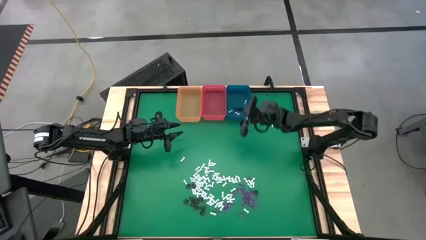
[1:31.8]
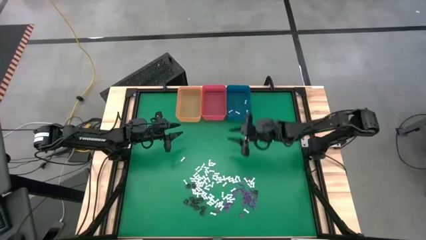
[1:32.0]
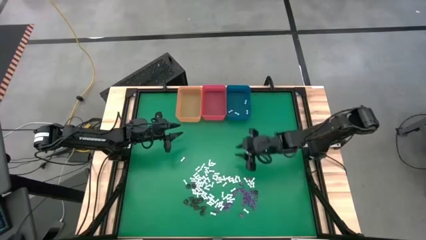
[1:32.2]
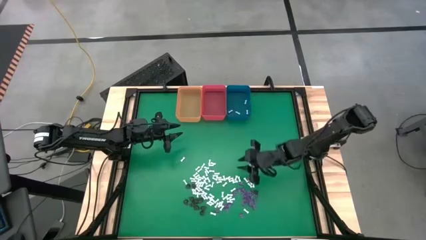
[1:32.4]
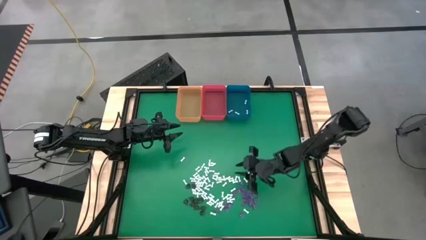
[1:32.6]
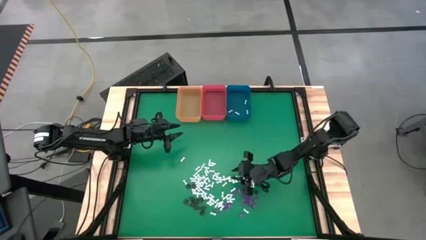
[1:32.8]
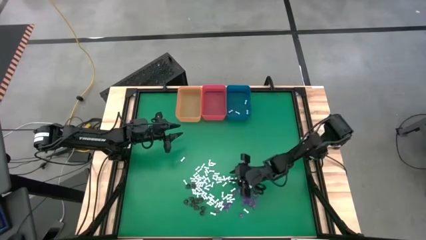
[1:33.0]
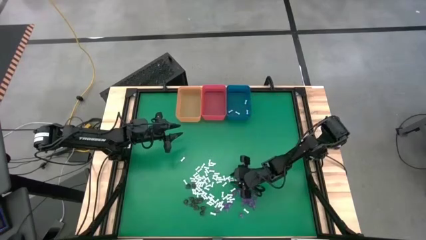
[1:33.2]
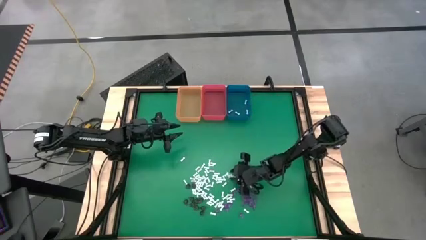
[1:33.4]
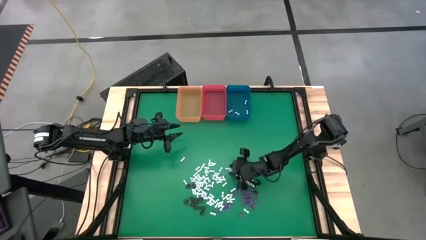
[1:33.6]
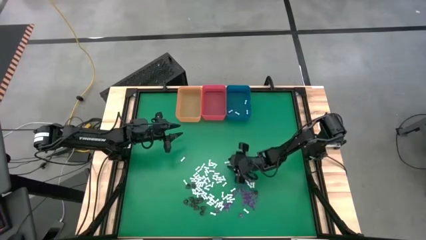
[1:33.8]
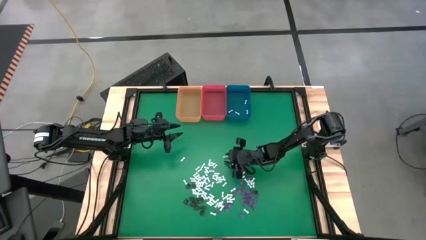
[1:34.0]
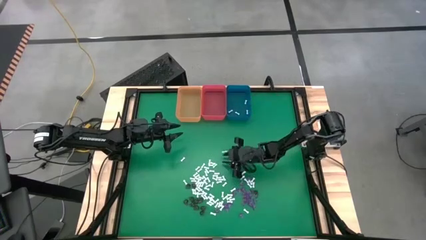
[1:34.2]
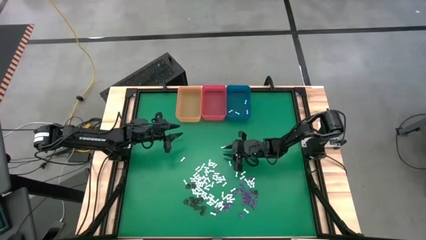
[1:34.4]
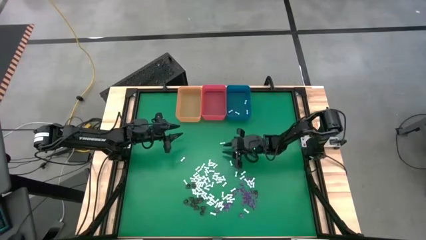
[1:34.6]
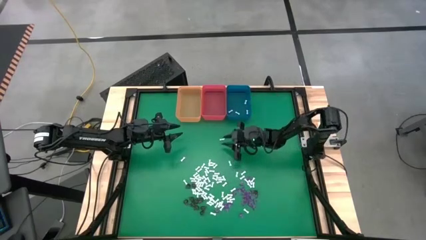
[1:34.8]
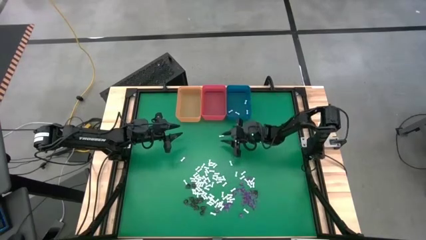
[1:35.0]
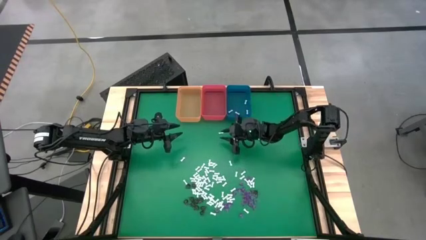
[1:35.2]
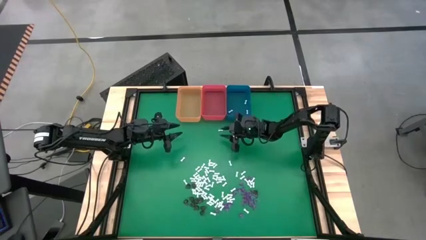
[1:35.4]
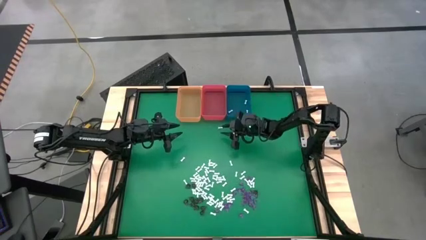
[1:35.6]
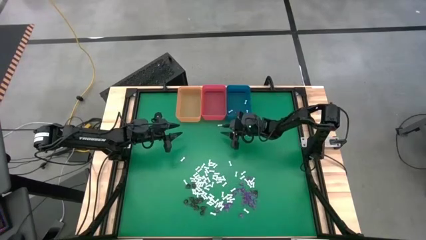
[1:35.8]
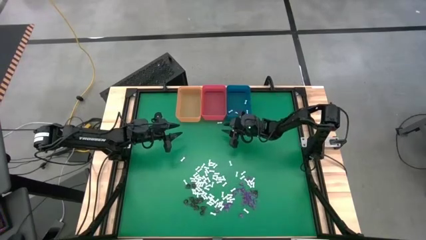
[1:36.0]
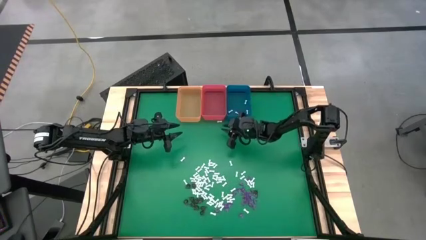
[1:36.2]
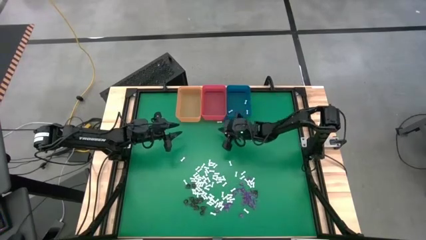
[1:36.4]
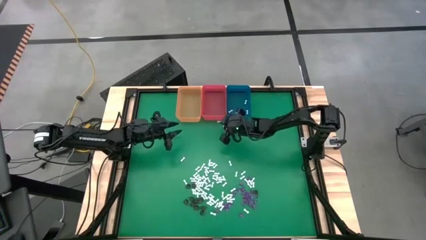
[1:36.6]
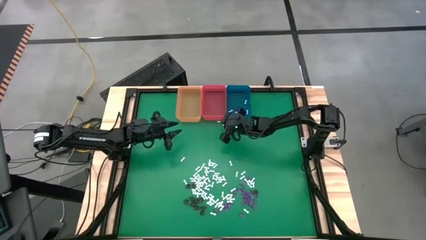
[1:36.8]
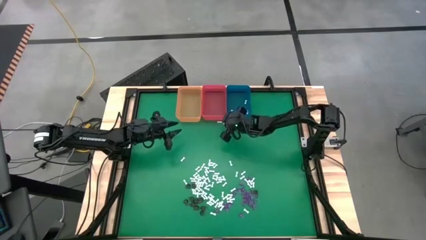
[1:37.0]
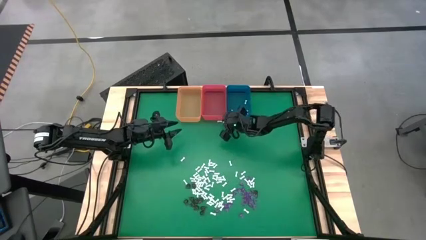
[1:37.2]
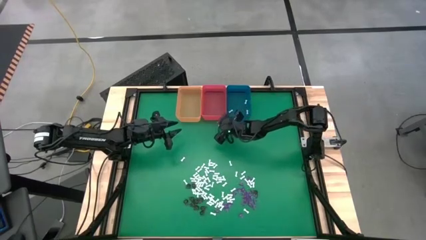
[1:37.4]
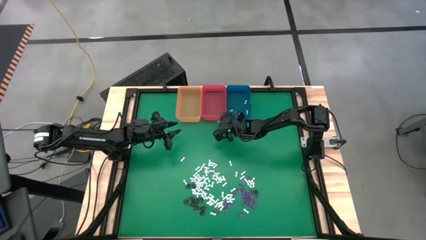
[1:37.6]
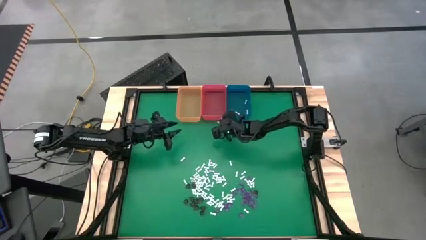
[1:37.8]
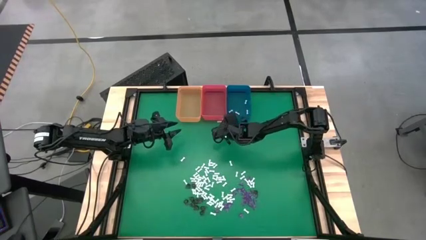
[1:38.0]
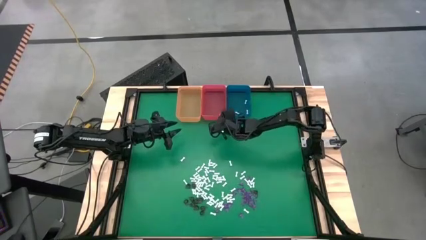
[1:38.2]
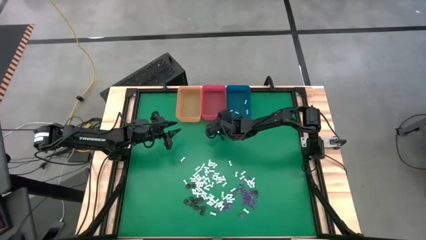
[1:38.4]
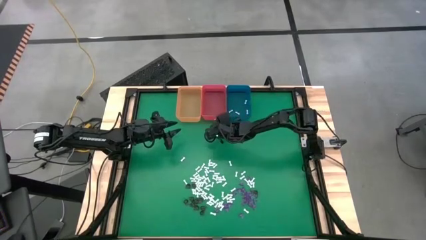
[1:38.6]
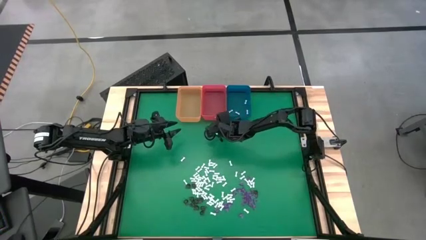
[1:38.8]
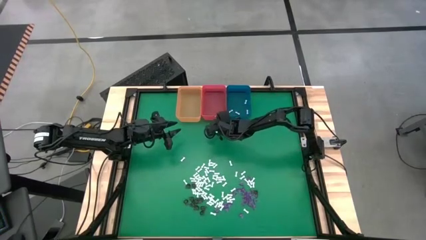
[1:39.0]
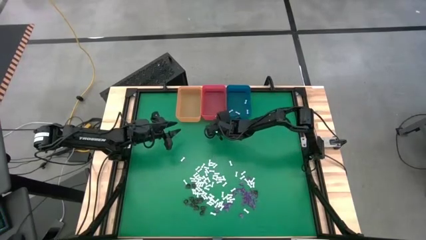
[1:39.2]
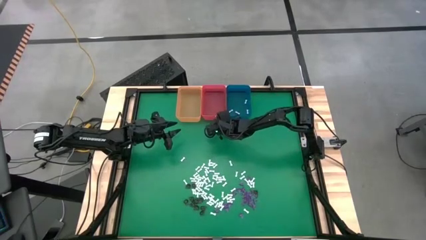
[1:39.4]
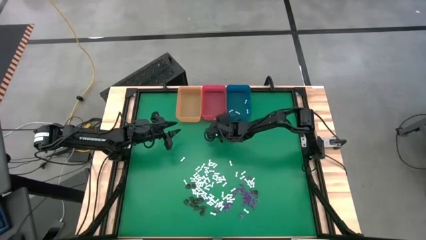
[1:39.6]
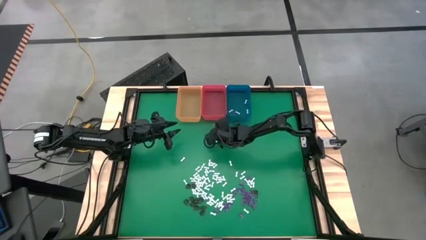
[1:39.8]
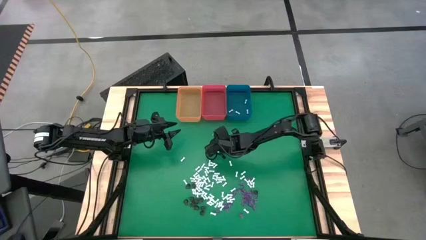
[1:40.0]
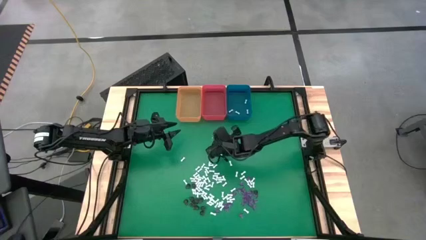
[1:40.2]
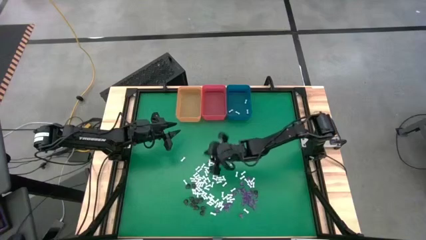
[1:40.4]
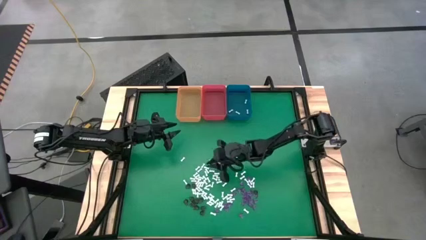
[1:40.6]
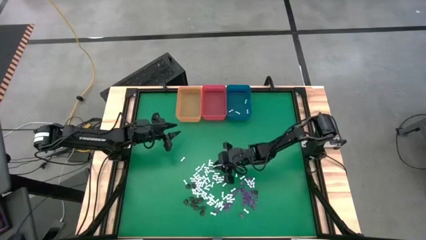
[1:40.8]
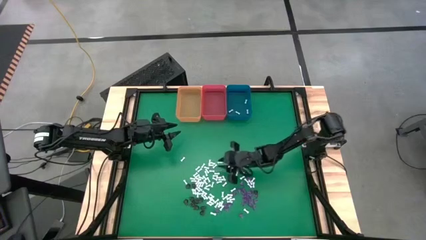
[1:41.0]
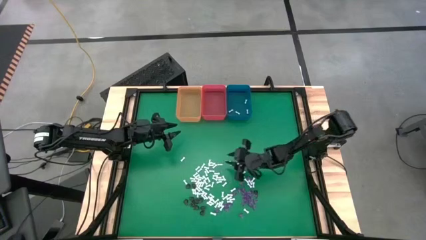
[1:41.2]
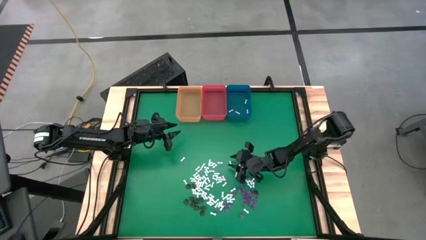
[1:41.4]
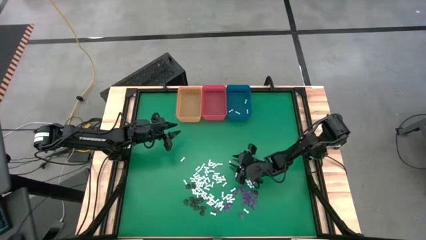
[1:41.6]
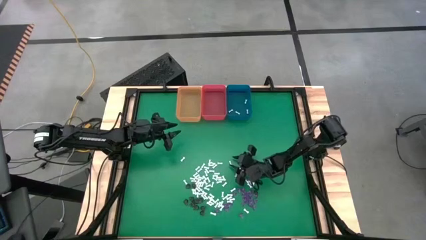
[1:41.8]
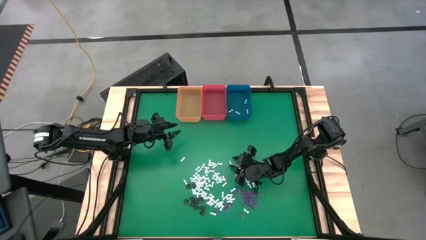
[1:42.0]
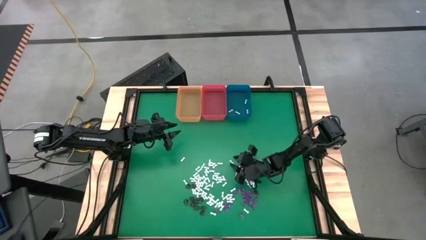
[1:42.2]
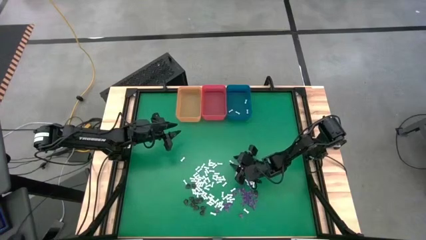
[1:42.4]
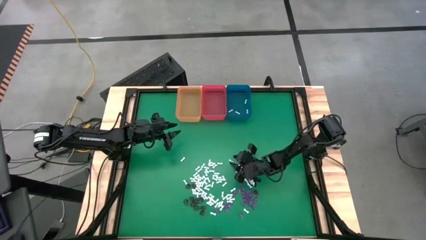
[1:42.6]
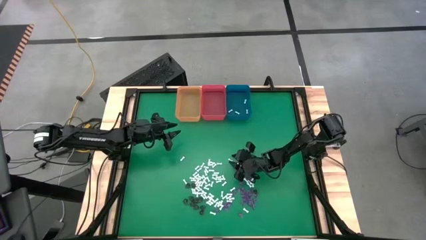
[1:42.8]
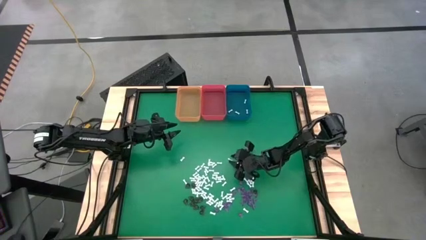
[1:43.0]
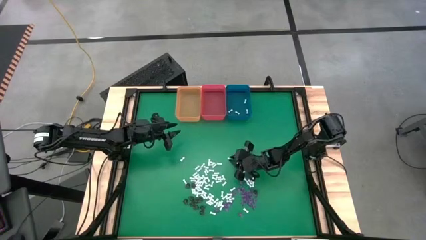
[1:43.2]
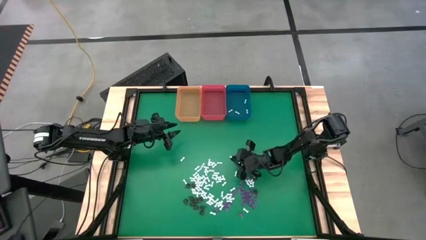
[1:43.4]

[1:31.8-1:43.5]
Task: Sort Halloween decoration
Put the bone into the blue bin

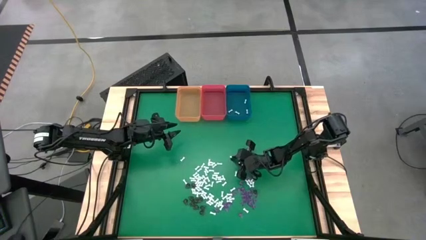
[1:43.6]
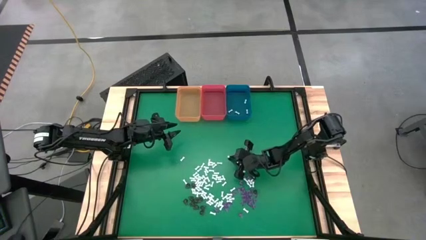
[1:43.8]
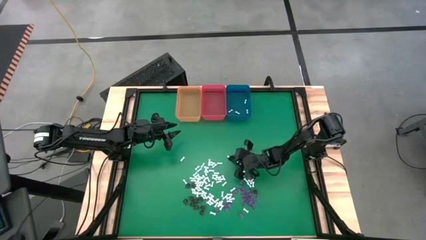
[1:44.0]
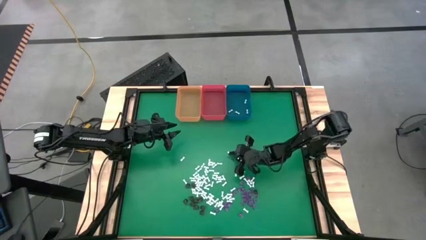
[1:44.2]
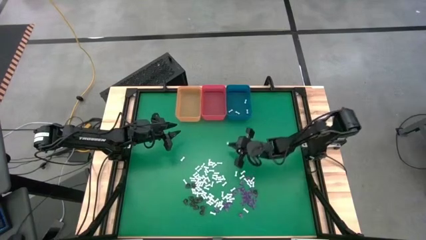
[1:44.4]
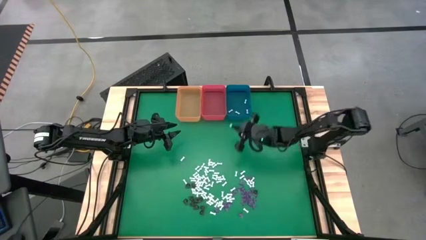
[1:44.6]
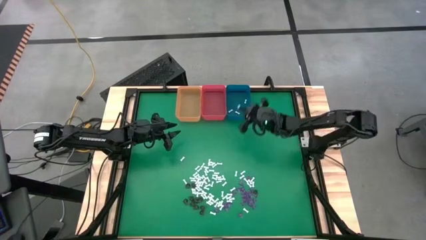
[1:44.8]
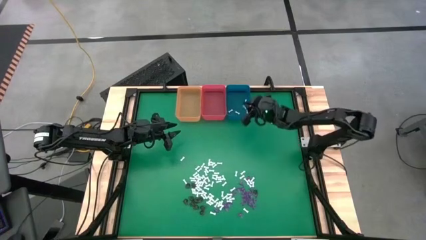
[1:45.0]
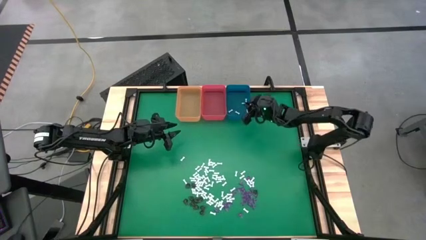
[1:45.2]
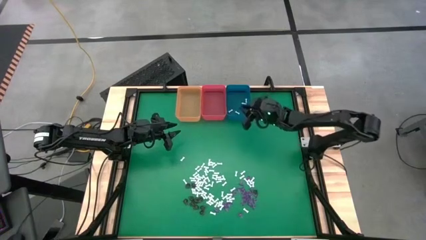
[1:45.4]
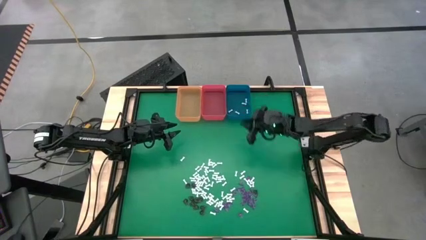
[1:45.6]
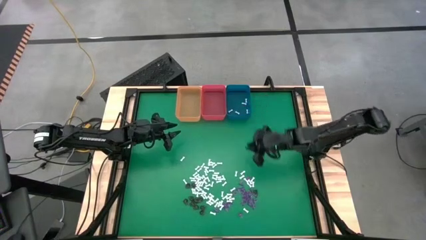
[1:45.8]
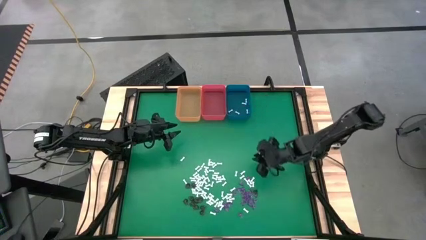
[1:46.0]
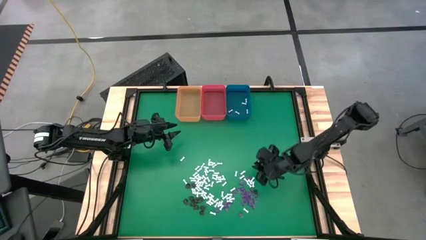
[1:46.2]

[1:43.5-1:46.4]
Put the white bone toy into the blue bin

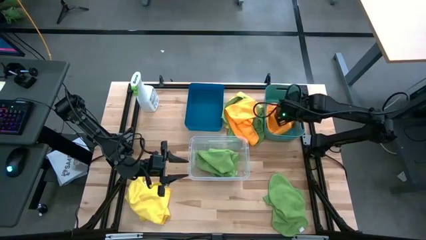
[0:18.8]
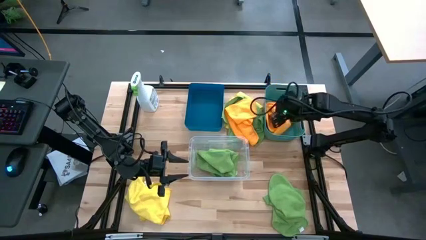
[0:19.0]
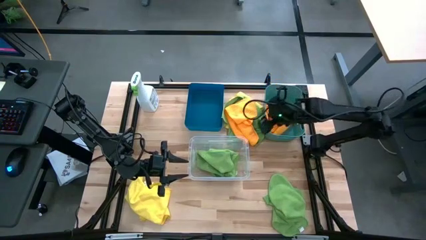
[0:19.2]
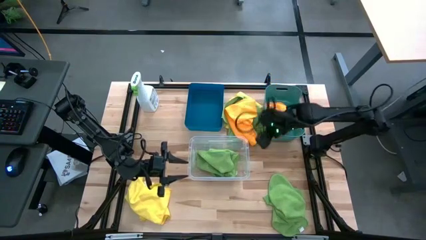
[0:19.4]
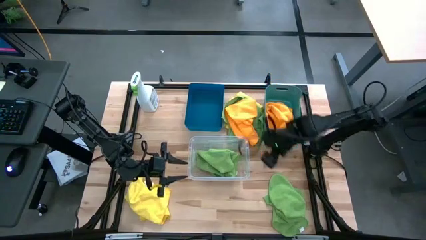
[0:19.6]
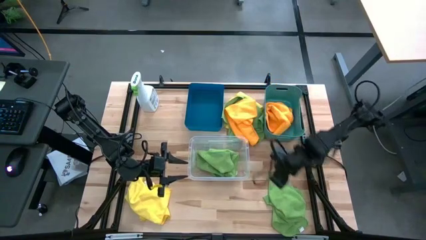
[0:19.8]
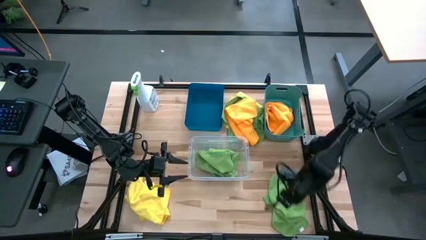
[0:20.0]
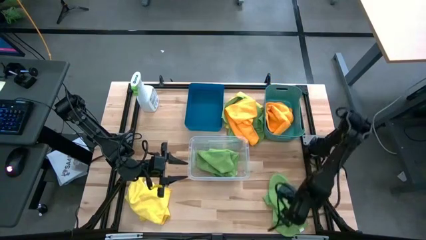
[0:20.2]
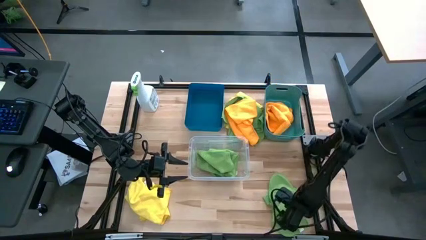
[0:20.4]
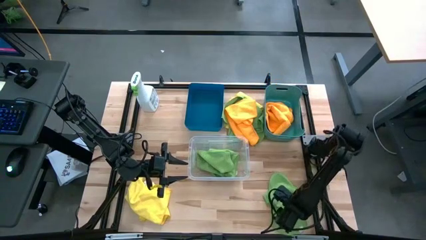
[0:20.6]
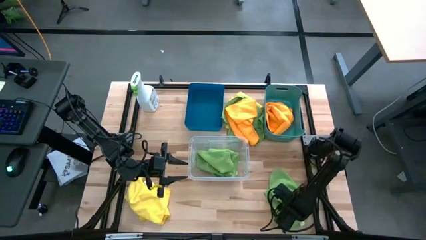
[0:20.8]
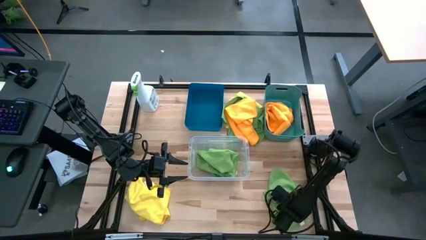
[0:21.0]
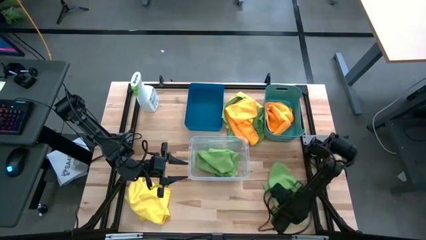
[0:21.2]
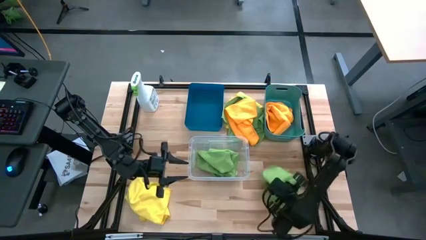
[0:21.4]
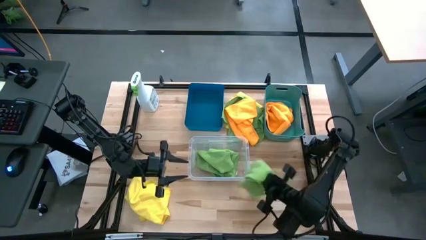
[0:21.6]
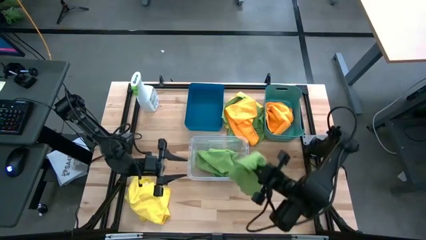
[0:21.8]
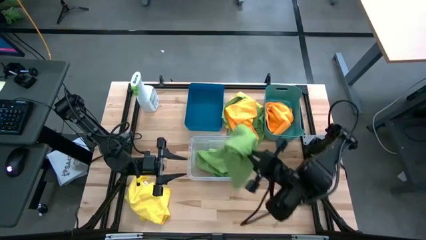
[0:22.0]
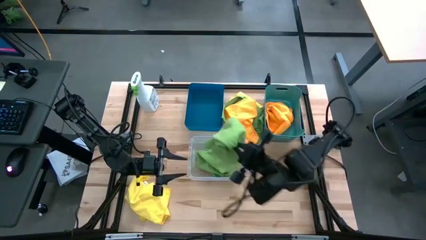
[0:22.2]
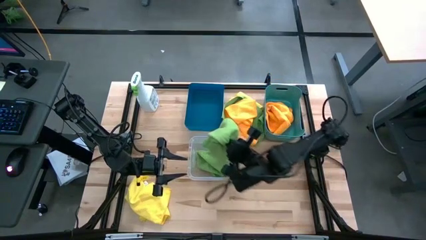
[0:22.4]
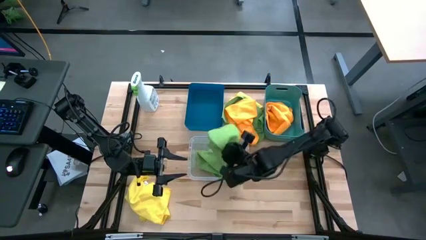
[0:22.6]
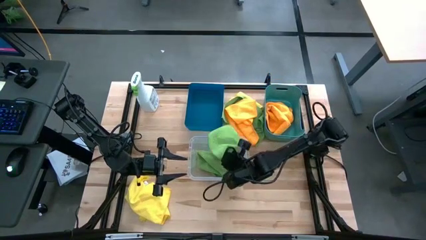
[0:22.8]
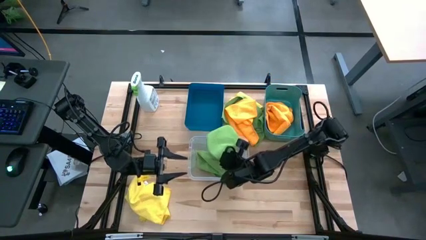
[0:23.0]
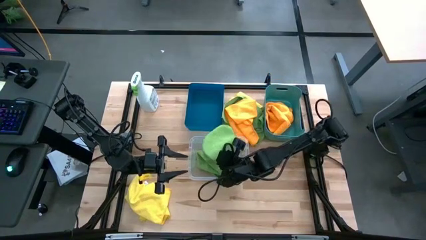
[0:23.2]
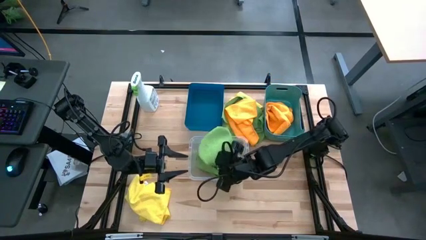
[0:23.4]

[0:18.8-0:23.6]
Task: Sort microfiber towel by color & place in baskets
Put the bottom green towel into the transparent bin
